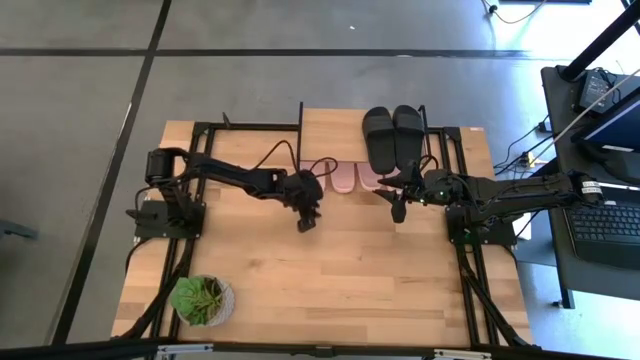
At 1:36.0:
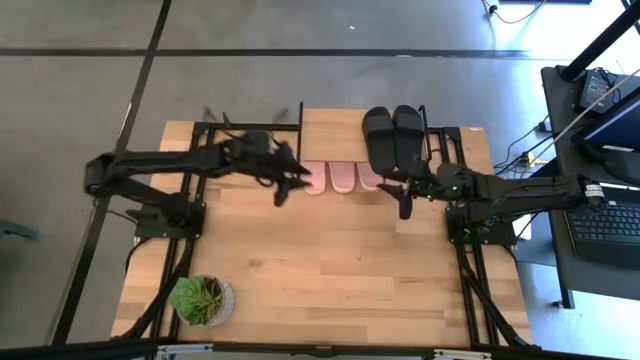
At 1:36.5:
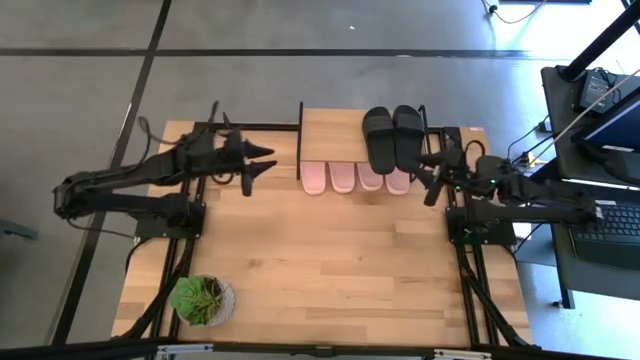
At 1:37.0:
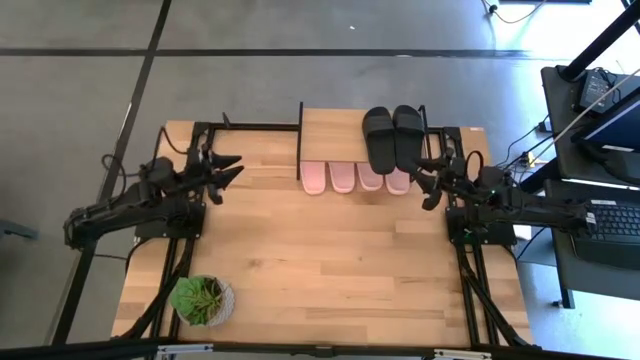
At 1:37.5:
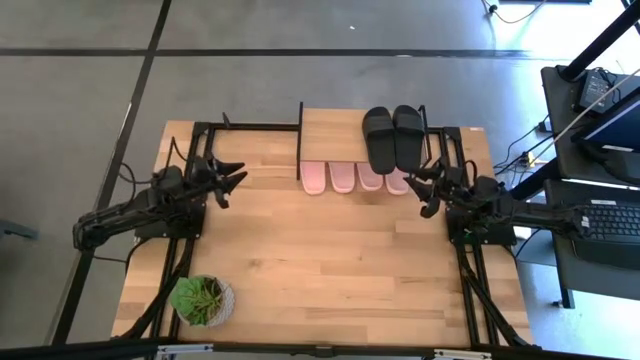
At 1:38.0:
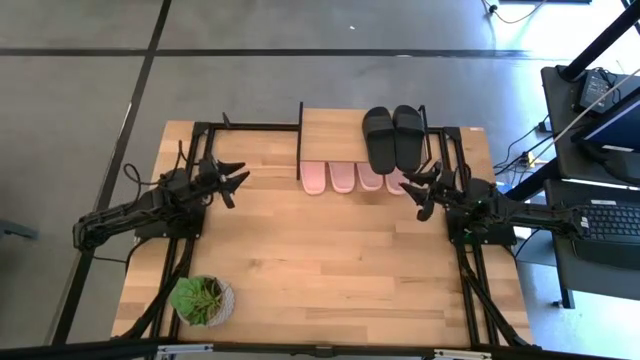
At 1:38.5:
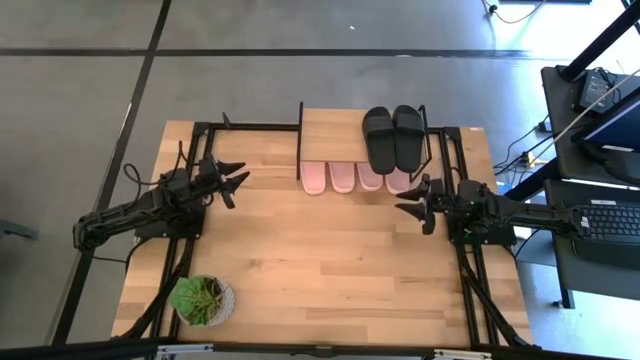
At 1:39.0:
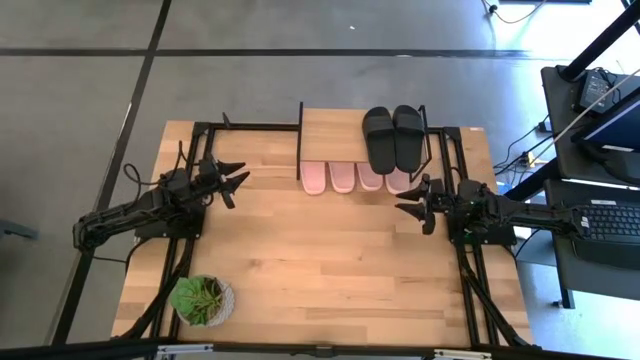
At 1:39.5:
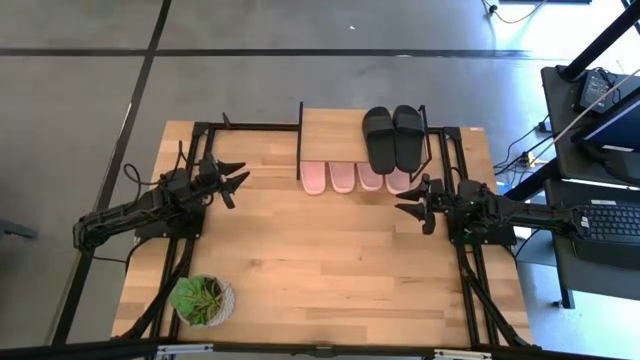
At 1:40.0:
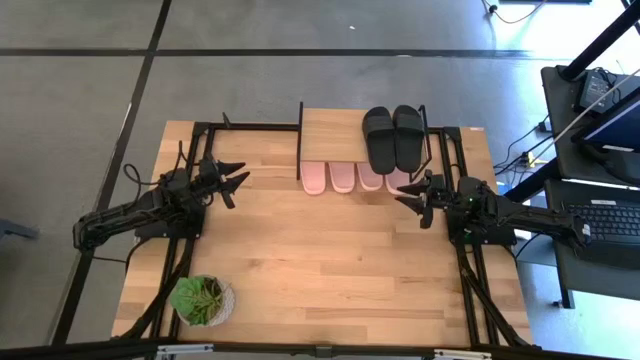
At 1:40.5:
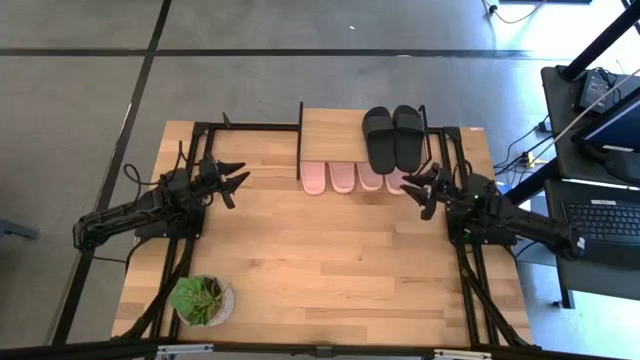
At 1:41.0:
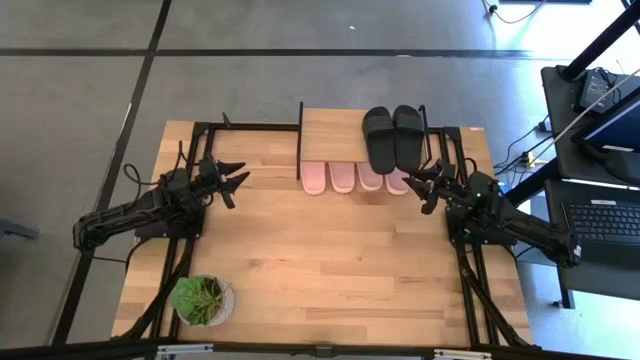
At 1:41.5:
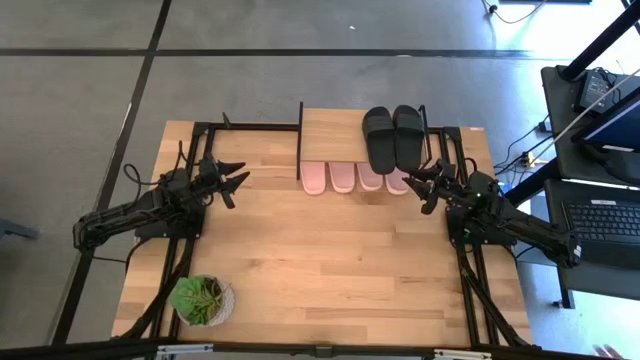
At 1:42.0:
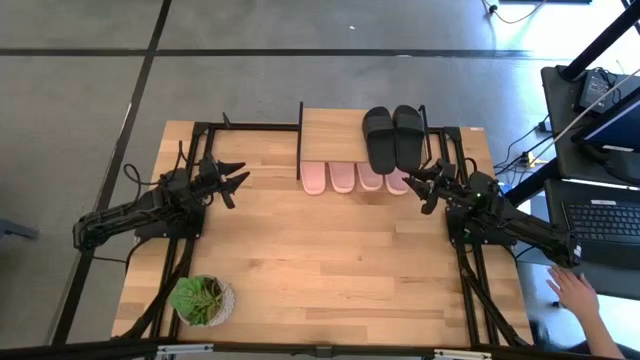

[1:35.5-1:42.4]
Task: Pick and place slides into the shelf
Return to Home Position

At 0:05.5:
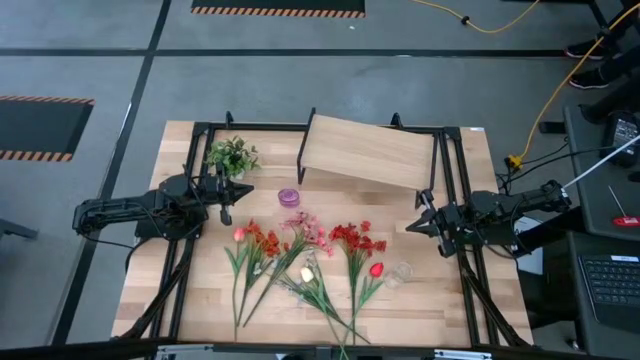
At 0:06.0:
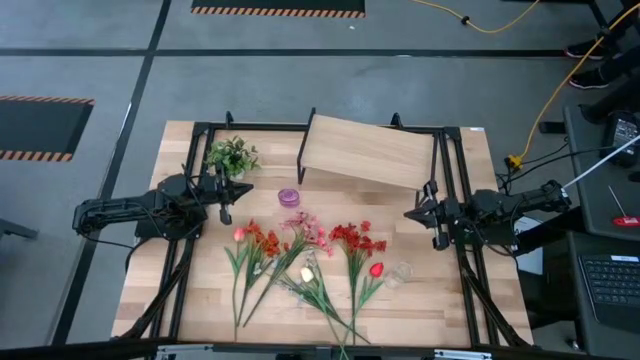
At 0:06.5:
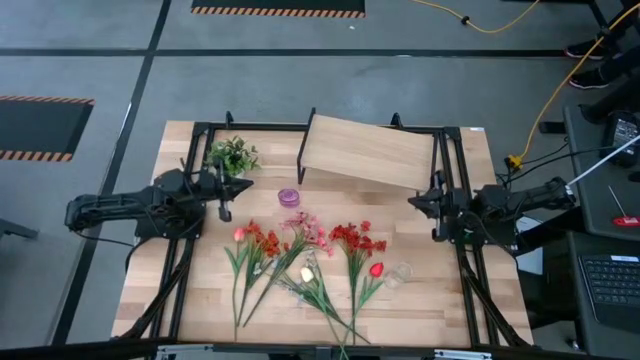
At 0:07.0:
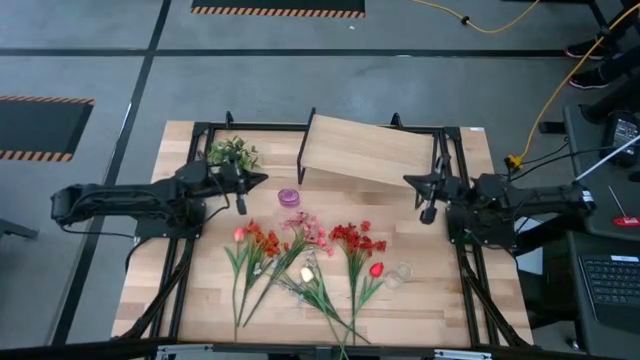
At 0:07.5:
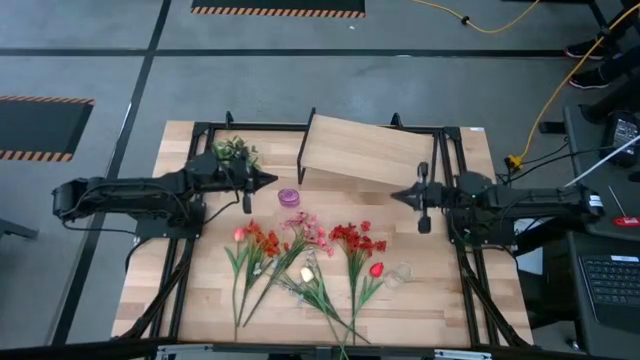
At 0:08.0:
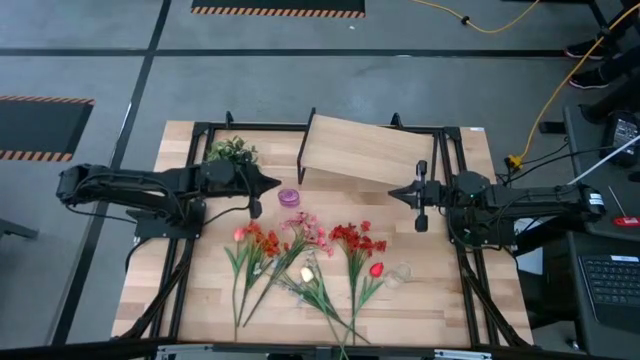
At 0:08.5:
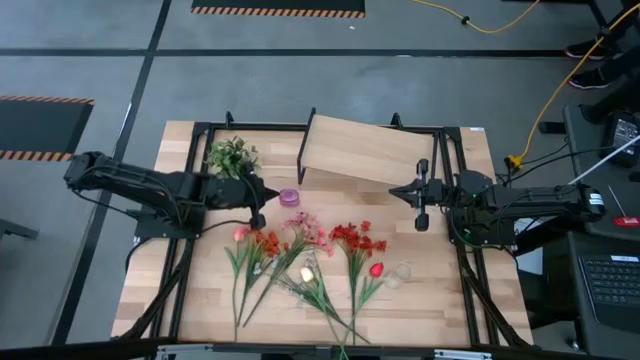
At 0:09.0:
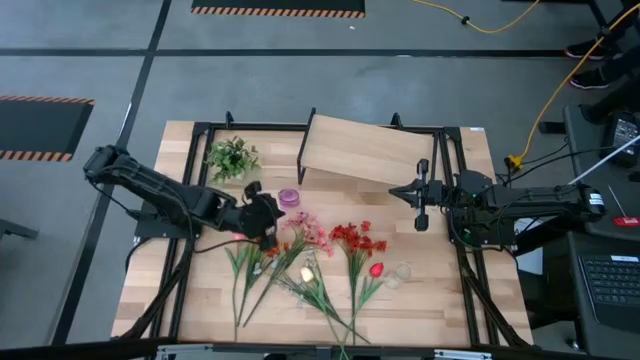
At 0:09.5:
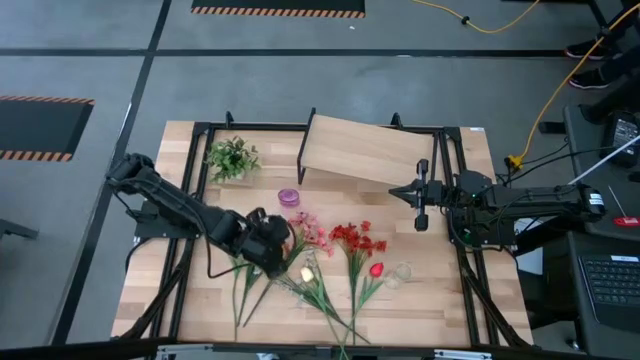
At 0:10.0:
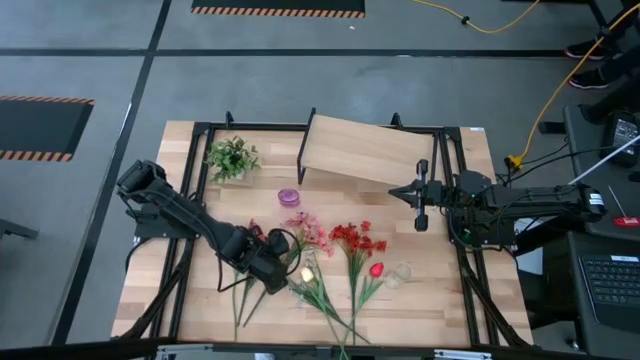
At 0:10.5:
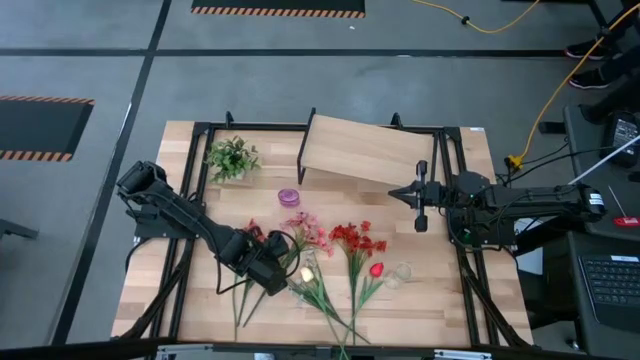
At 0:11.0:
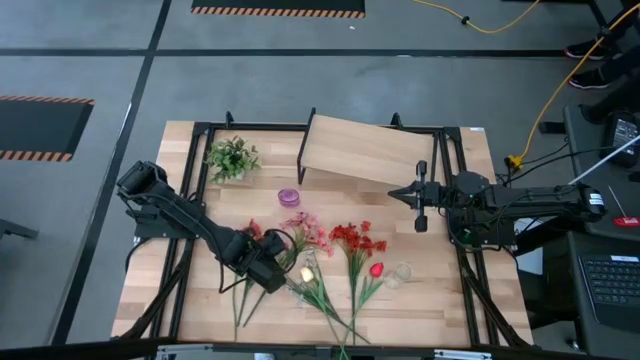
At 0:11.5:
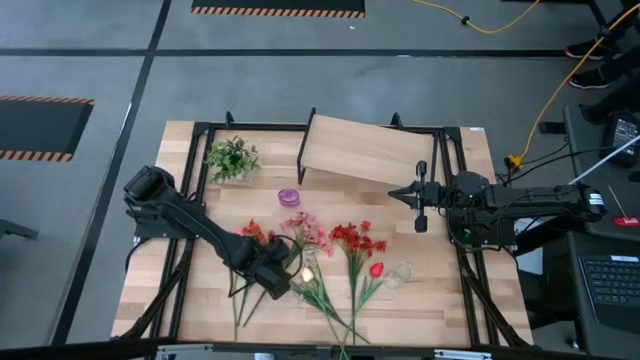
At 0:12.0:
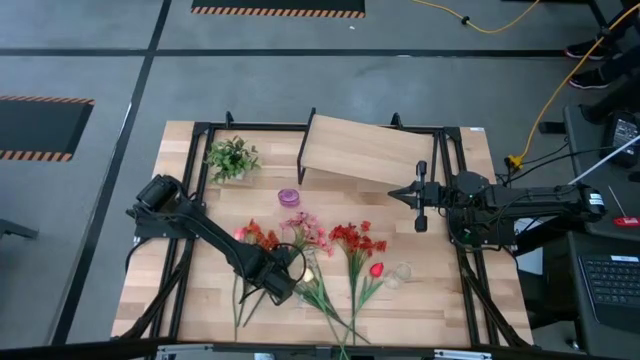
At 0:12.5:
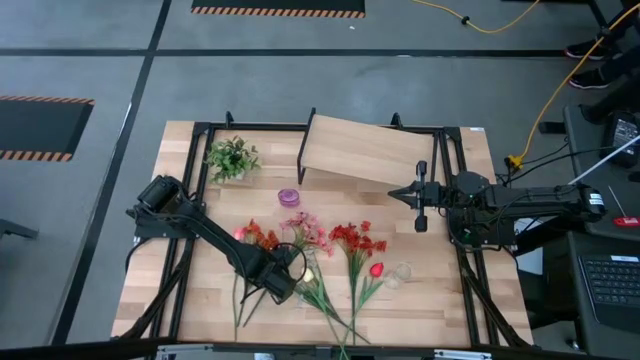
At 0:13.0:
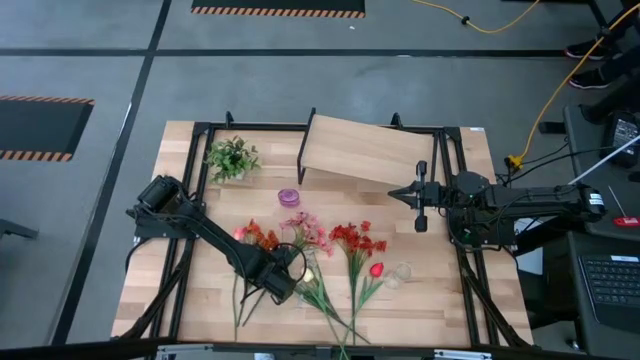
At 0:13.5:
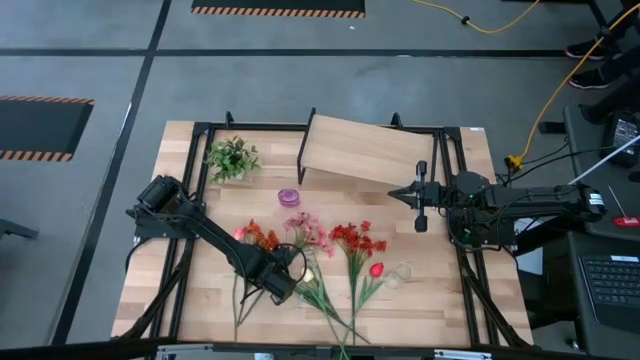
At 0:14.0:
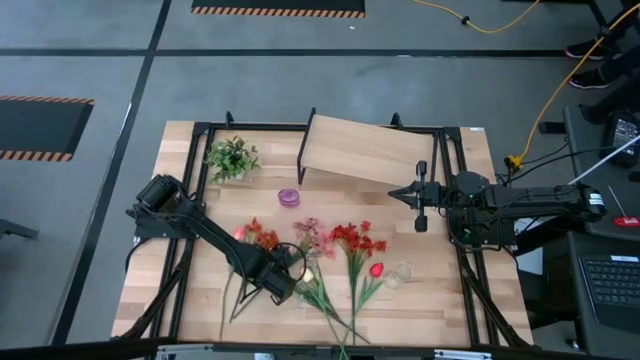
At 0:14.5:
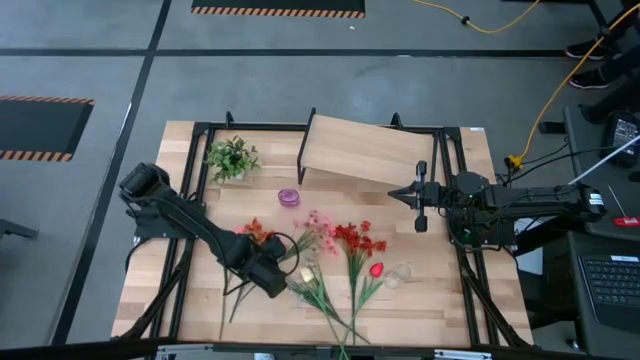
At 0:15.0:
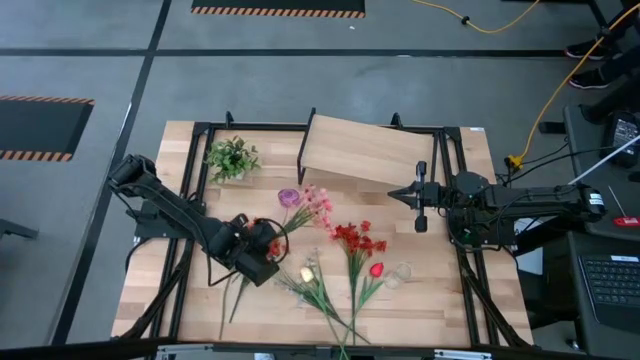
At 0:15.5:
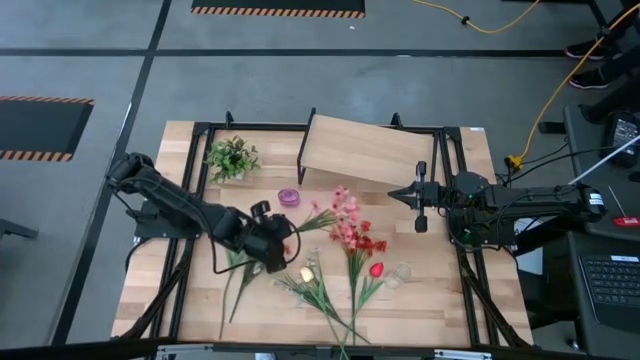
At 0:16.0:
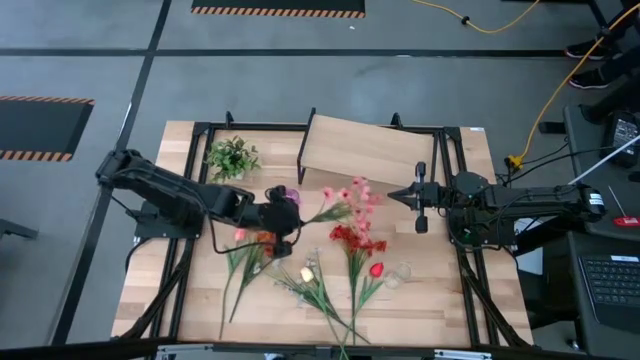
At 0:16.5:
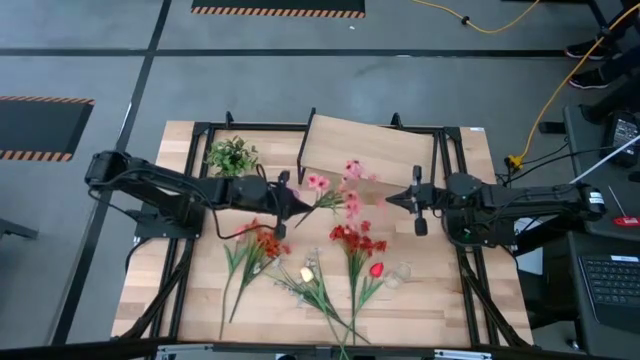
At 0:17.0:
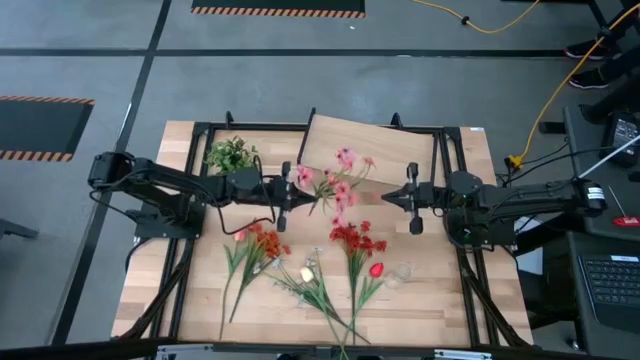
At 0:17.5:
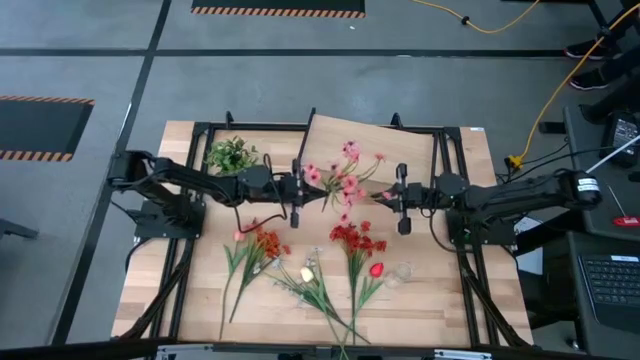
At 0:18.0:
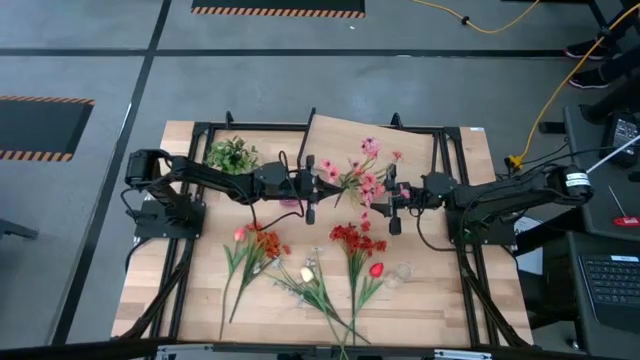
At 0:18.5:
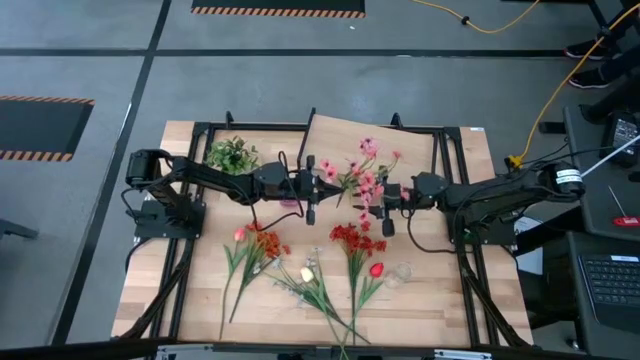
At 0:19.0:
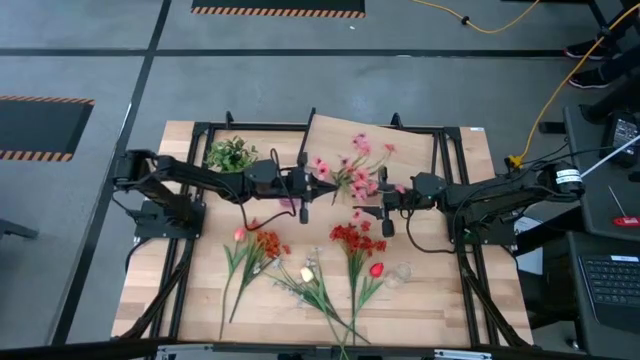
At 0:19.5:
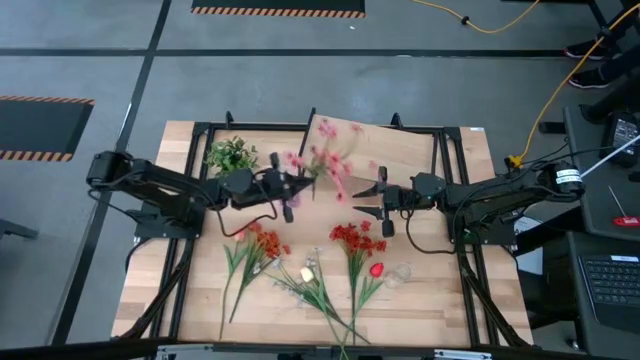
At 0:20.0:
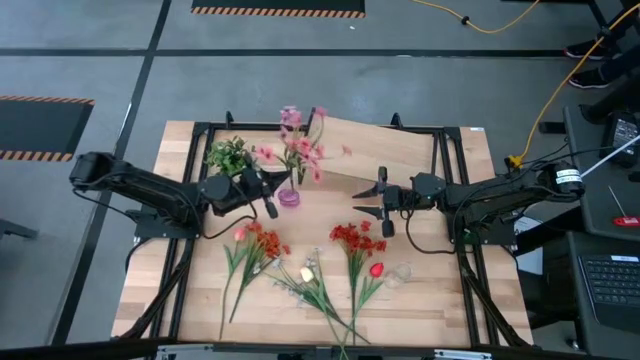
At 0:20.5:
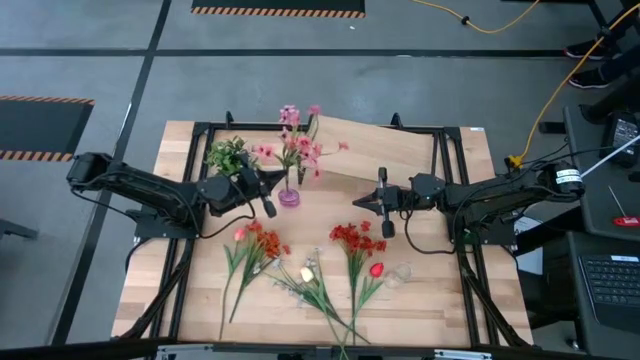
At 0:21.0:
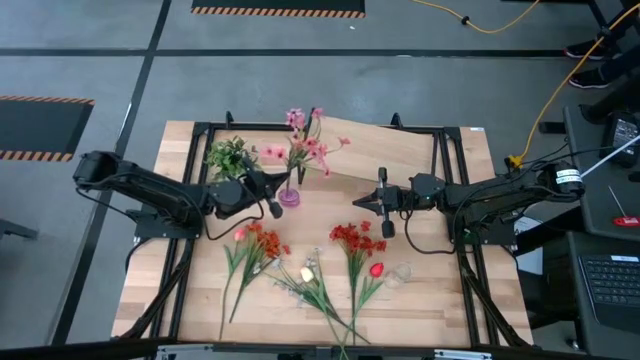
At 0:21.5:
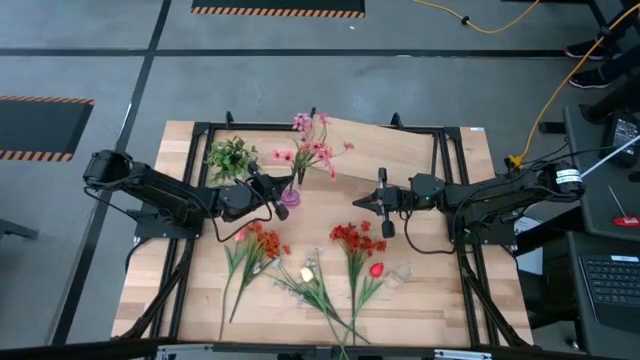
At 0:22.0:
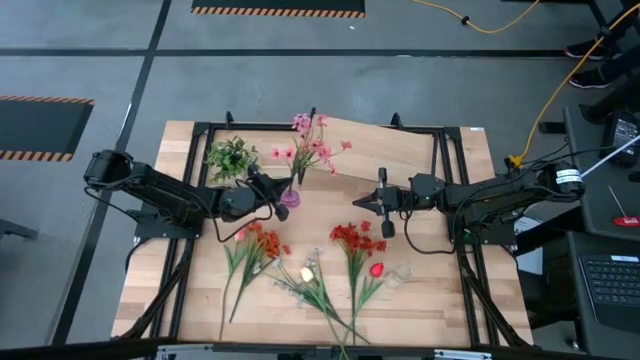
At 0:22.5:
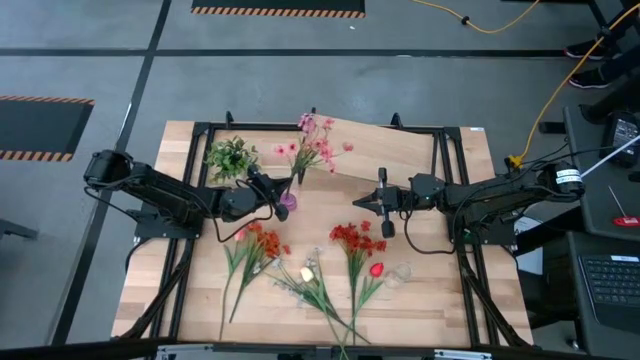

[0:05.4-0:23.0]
Task: Pick and place flowers into a vace then onto a shelf
Put the pink flowers into the purple vase
